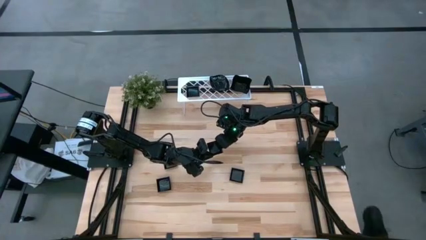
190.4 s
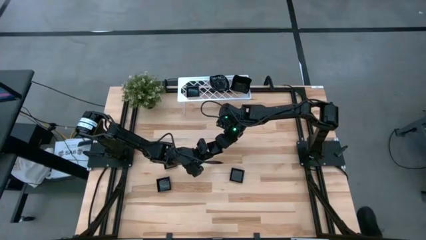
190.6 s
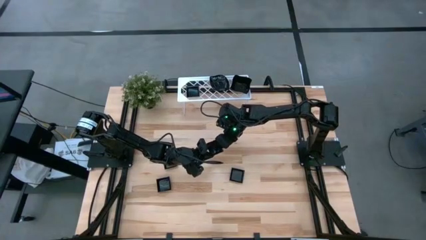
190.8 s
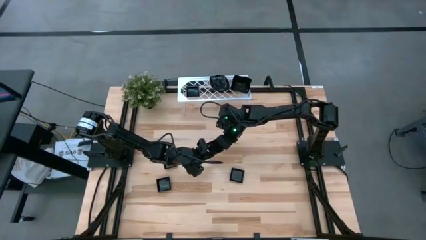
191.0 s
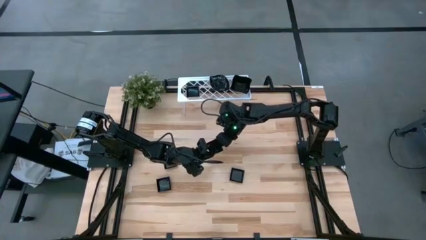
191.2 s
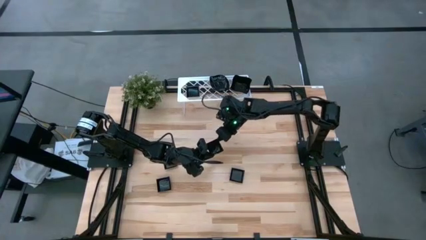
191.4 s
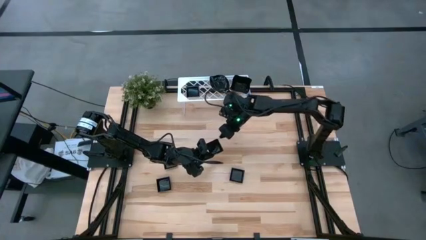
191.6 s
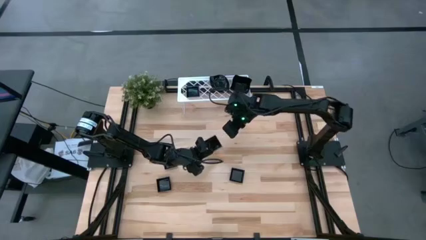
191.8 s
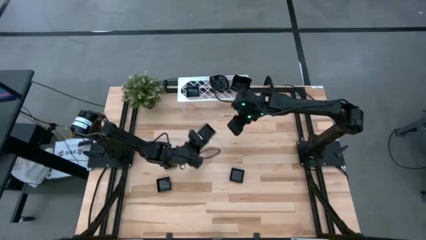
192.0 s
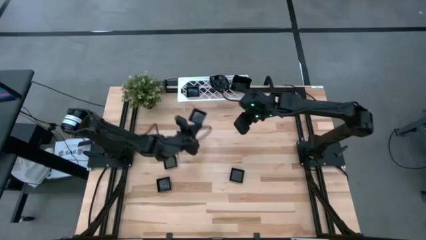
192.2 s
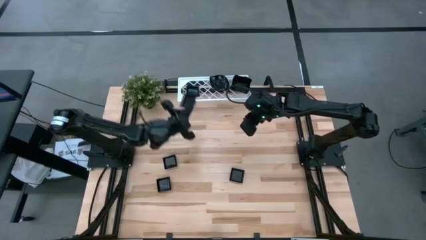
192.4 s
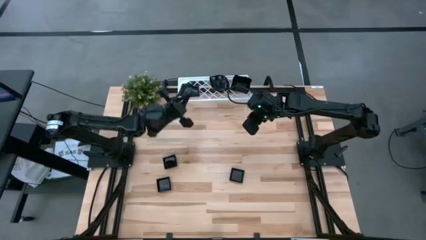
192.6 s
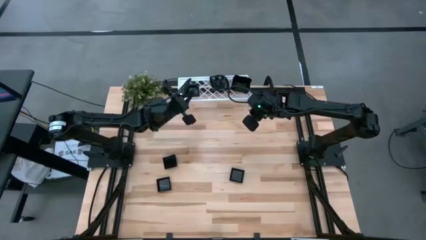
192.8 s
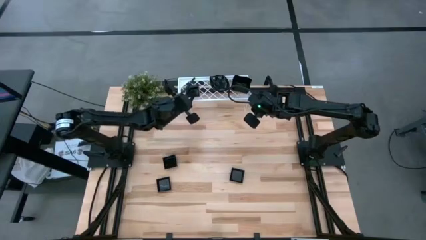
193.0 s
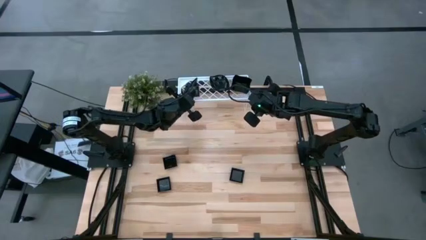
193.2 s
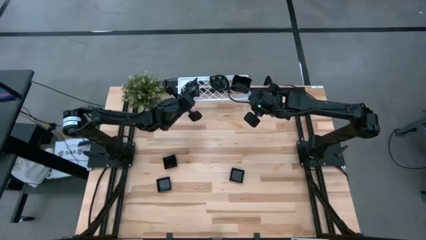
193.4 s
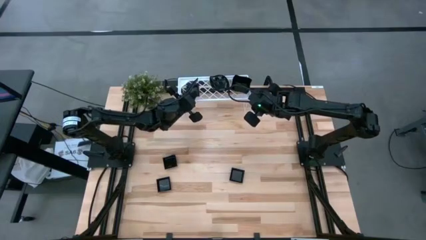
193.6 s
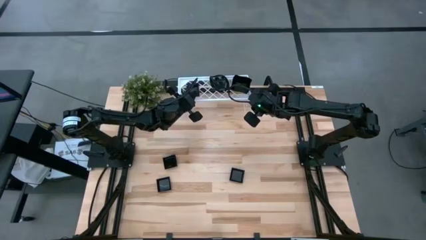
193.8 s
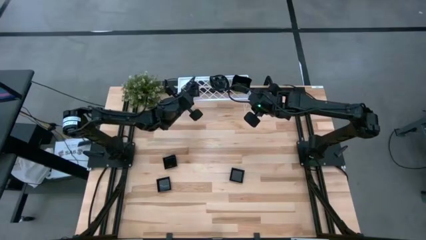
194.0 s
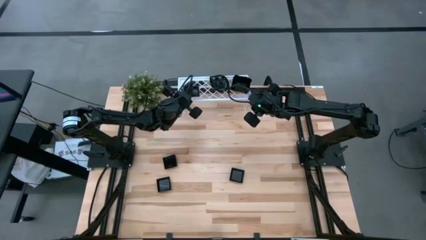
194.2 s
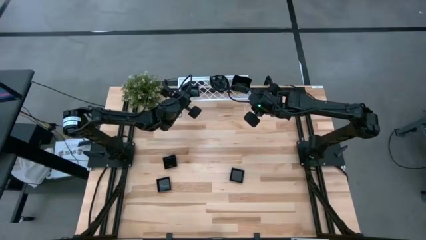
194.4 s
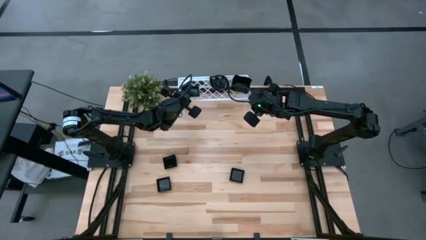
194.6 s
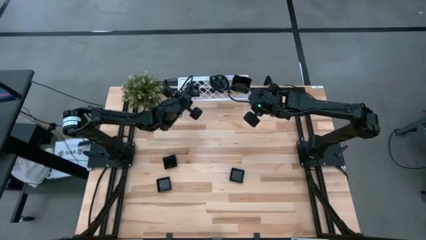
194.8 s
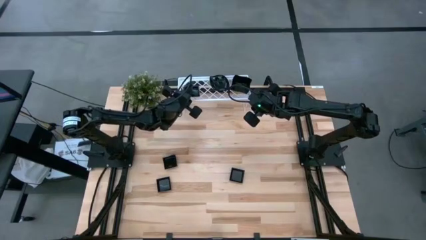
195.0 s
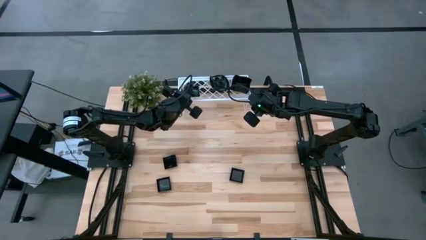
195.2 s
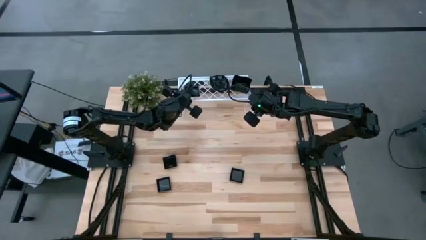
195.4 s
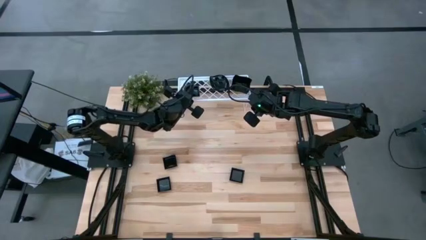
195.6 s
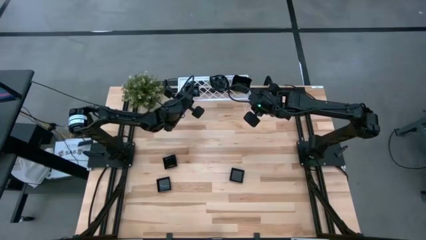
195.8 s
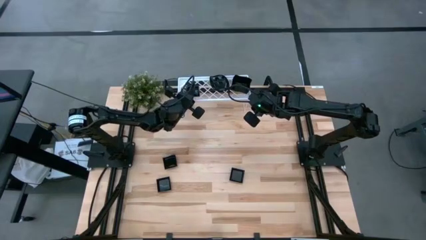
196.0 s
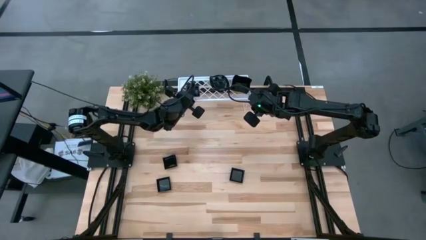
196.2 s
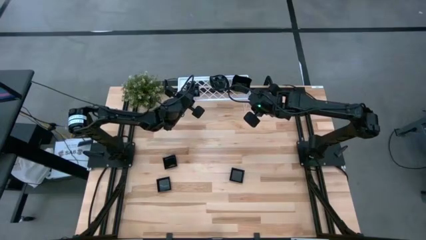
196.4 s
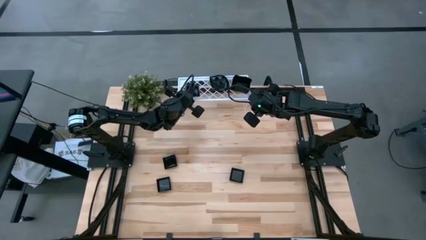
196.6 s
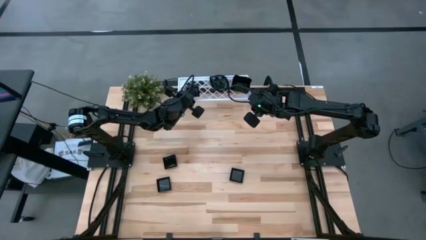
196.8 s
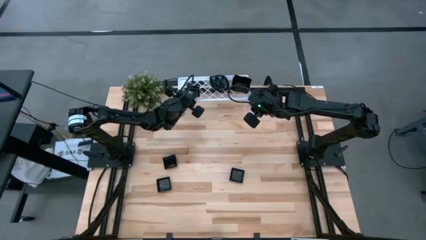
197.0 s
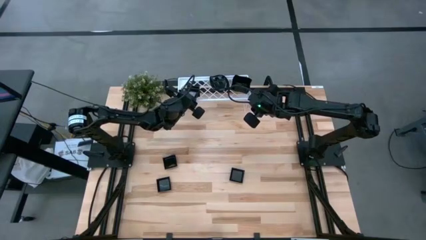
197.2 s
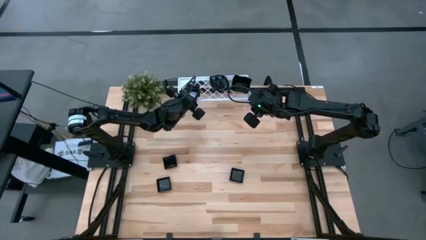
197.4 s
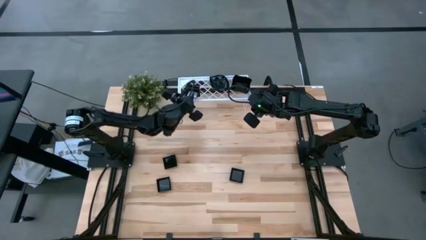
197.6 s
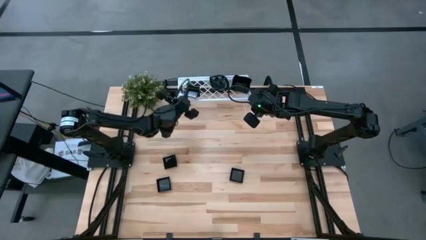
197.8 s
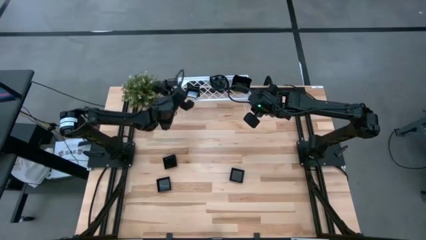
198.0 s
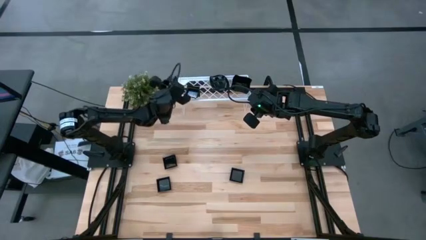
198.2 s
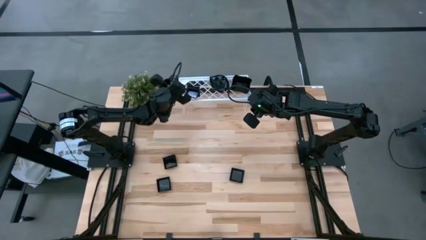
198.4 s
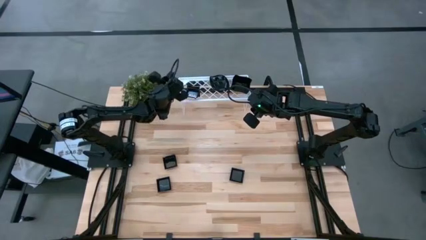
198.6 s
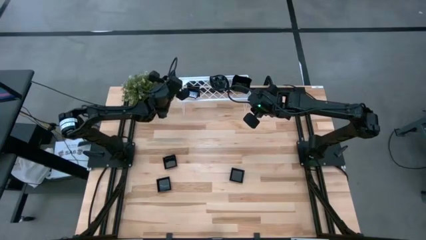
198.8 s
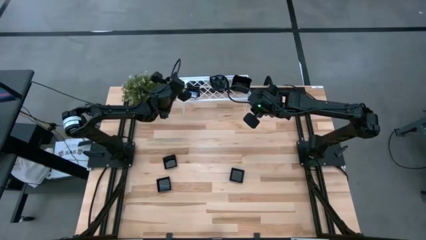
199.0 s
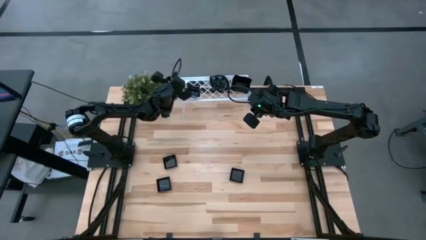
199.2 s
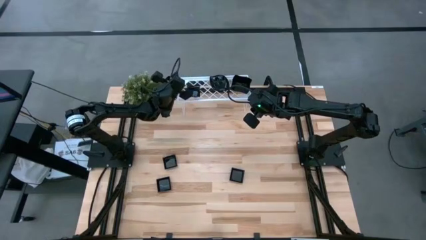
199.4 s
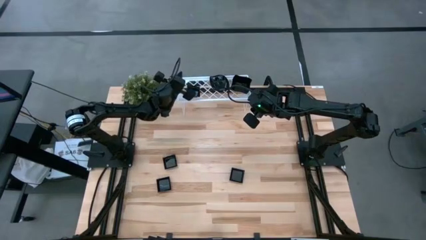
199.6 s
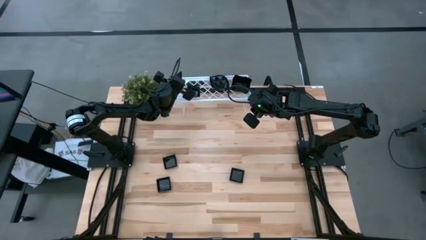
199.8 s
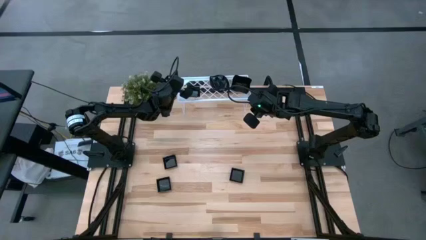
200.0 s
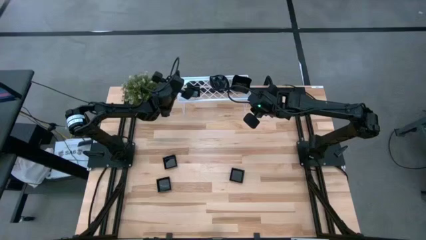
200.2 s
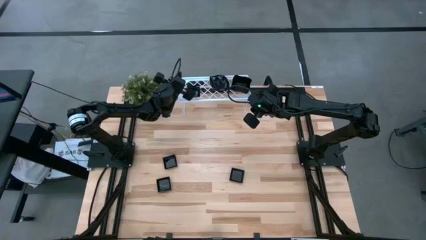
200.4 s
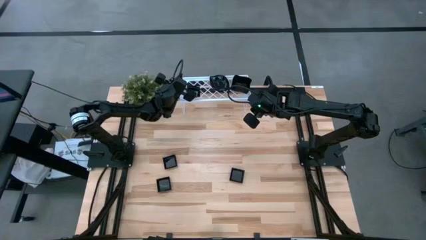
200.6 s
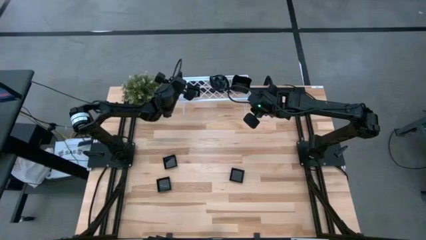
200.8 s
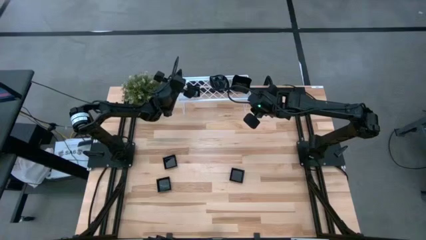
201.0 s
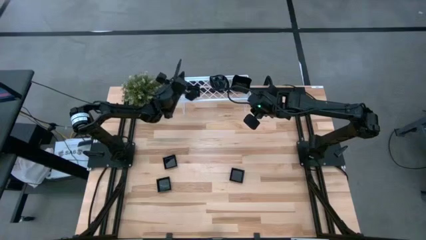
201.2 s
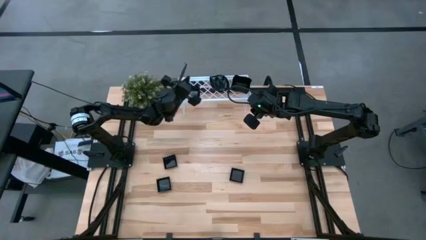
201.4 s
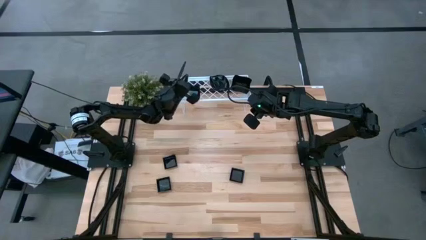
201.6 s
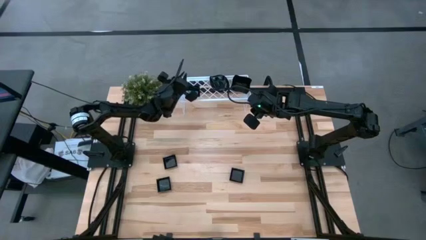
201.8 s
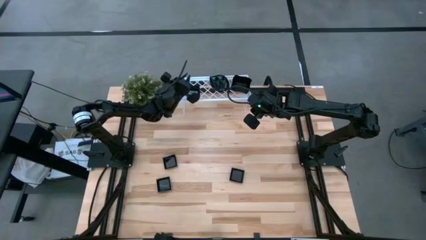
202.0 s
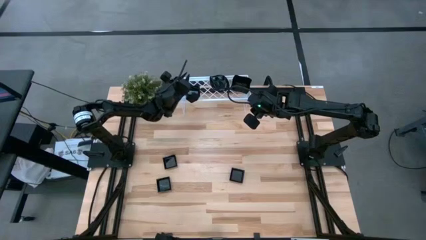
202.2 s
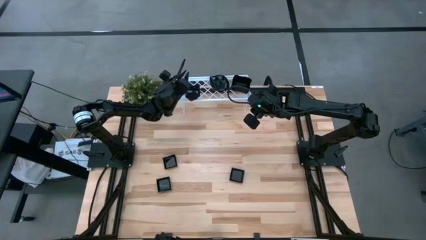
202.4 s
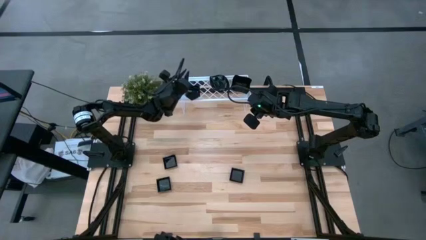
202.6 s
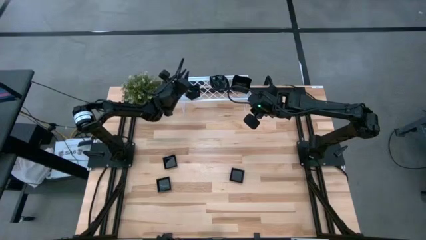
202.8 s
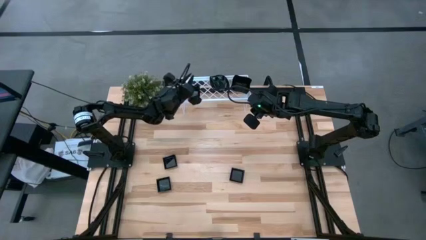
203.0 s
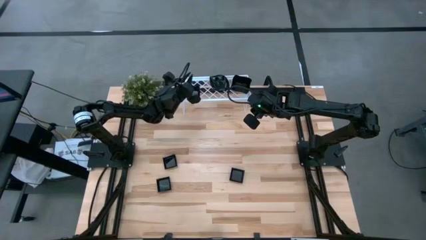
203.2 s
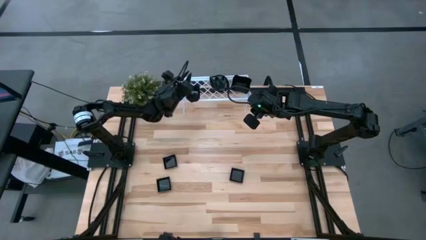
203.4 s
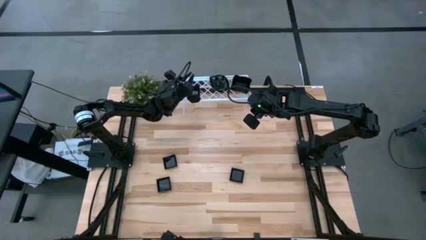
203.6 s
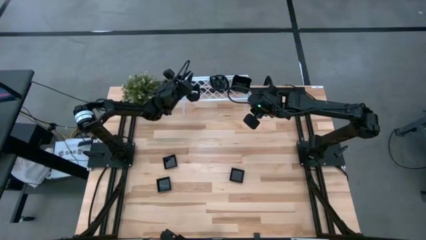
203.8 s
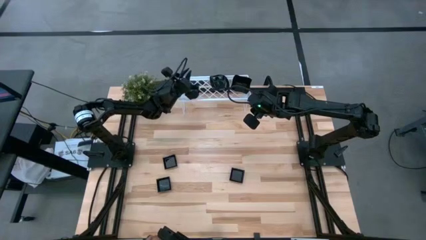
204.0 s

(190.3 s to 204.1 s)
Task: Pick & Place Mini shaped plates
Stack the black square plate on top of the black square plate on the shelf
